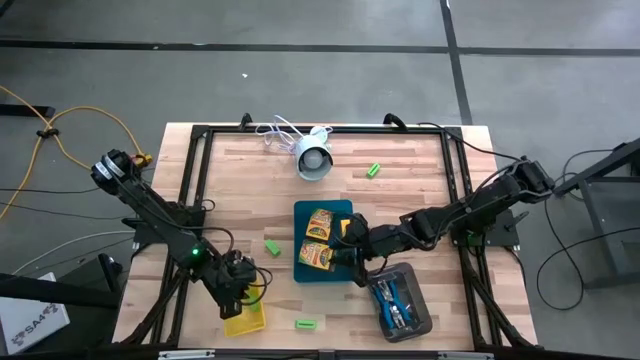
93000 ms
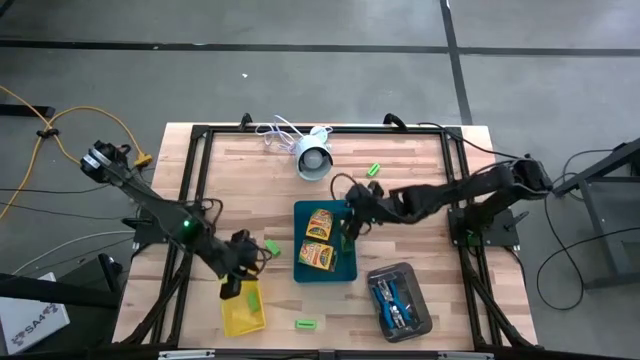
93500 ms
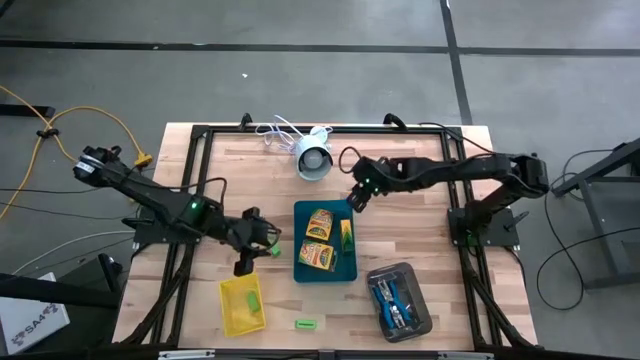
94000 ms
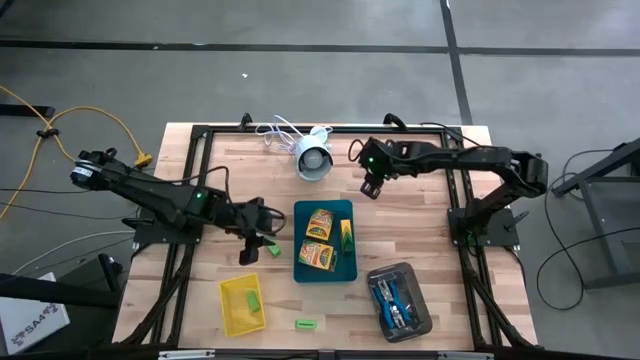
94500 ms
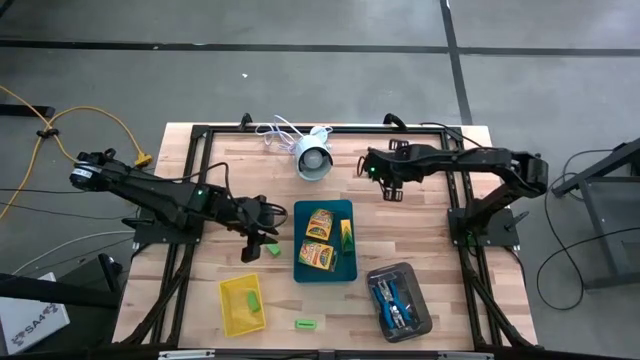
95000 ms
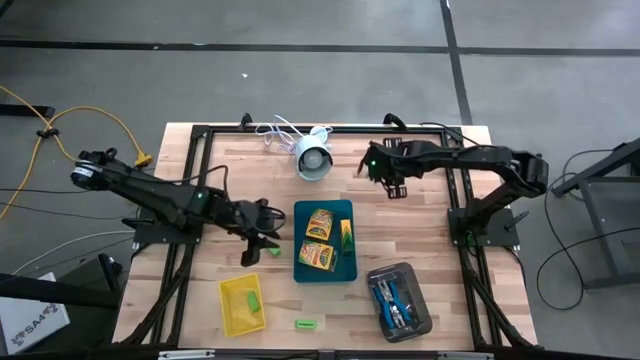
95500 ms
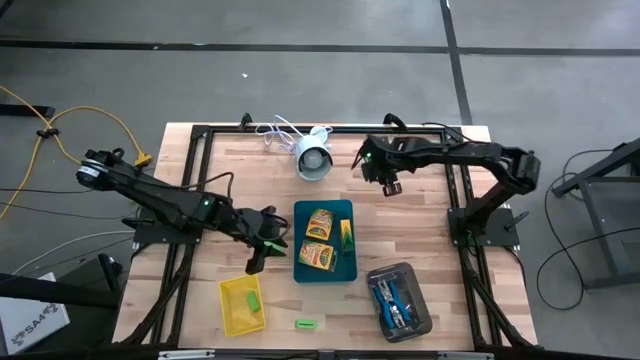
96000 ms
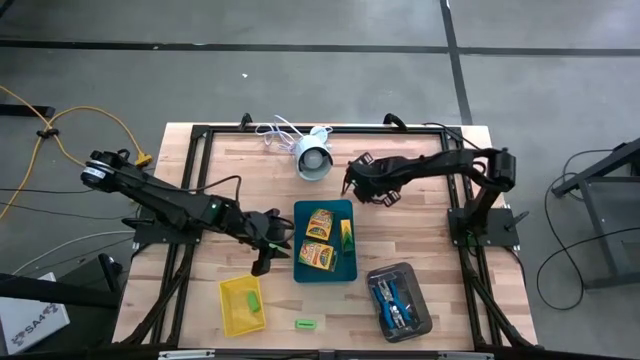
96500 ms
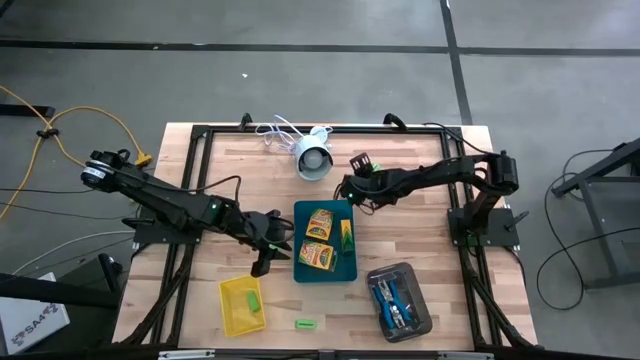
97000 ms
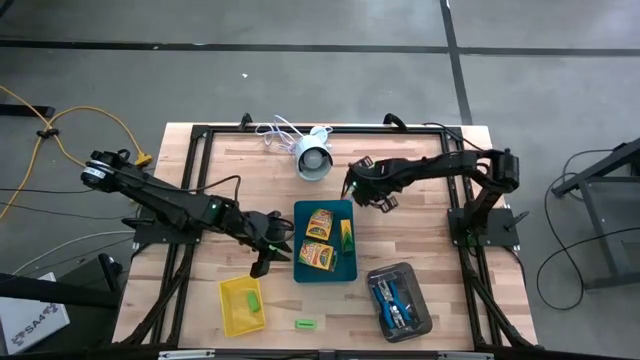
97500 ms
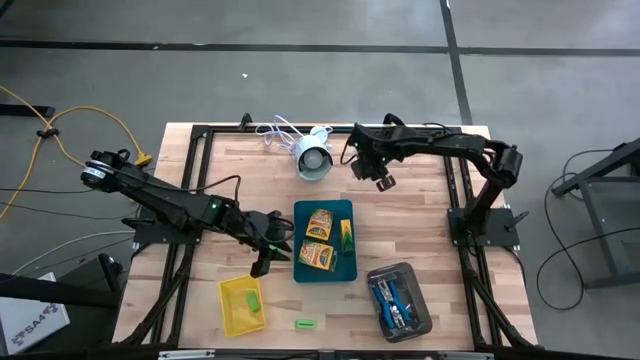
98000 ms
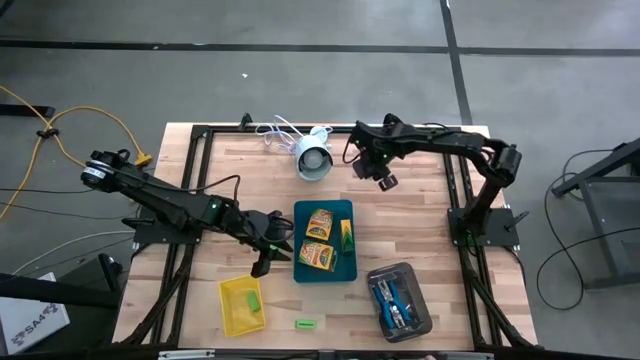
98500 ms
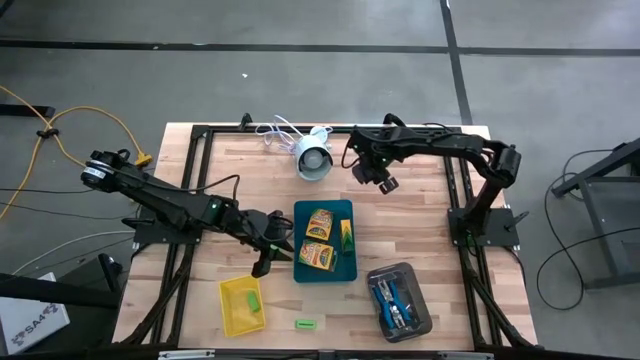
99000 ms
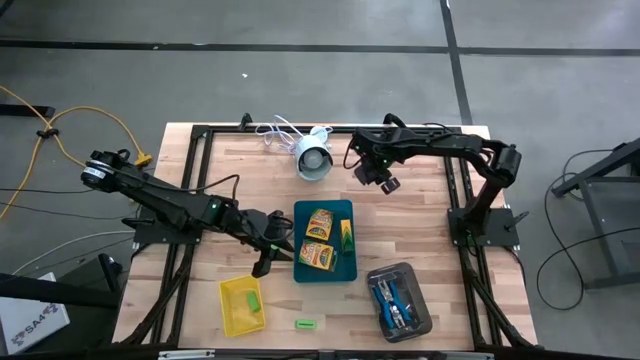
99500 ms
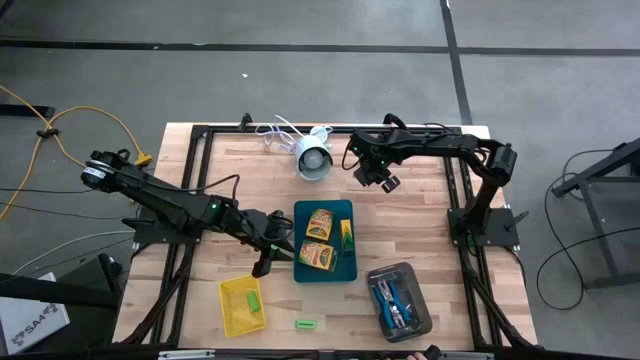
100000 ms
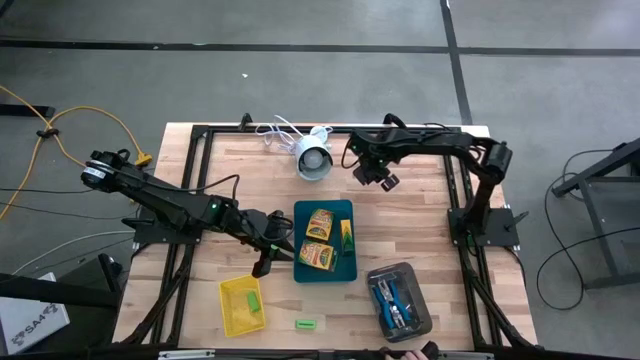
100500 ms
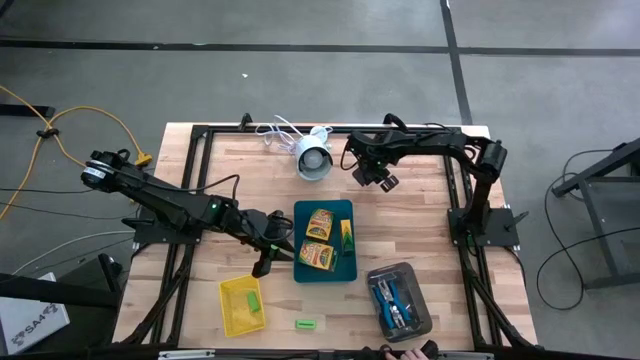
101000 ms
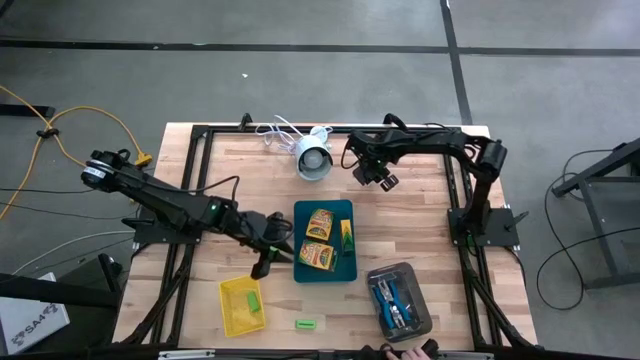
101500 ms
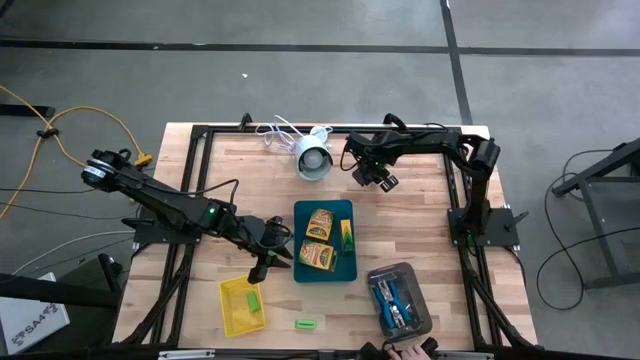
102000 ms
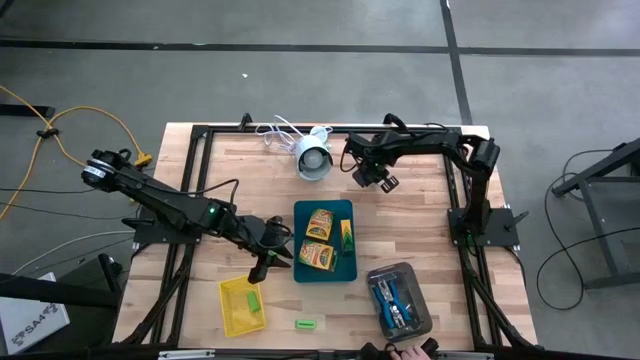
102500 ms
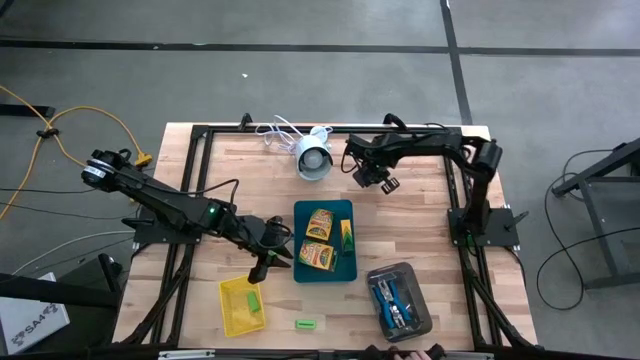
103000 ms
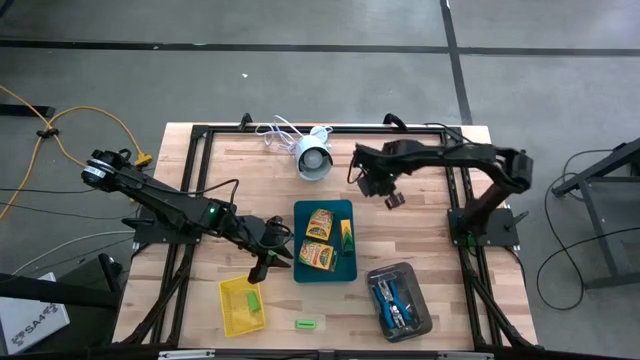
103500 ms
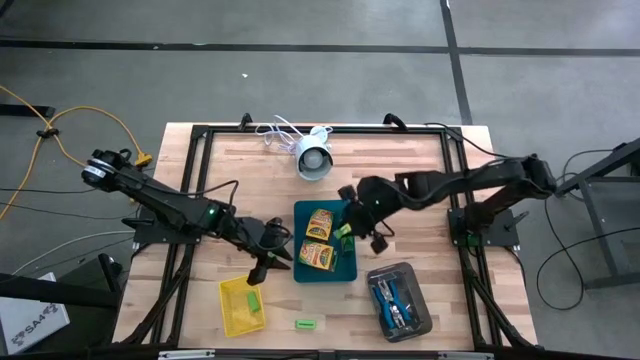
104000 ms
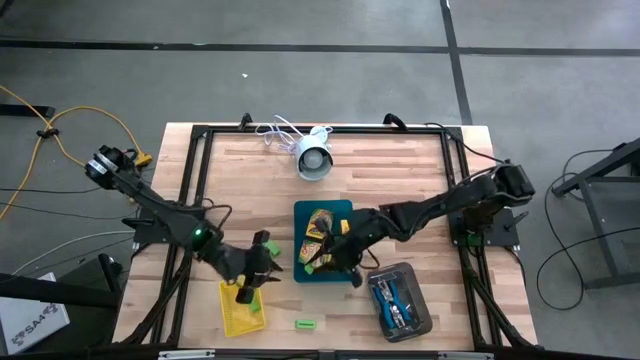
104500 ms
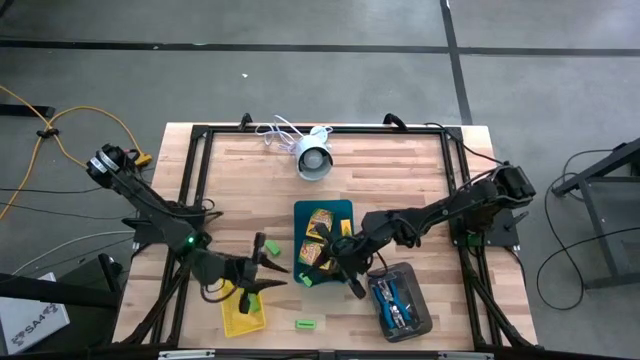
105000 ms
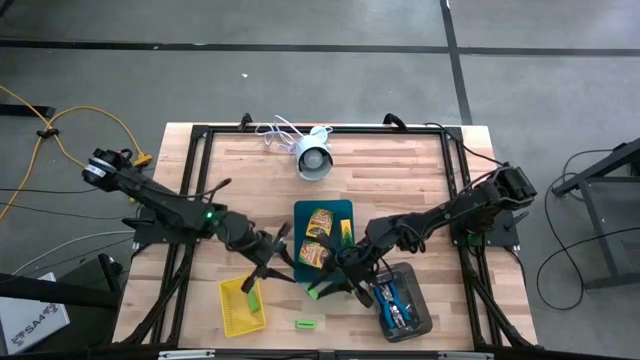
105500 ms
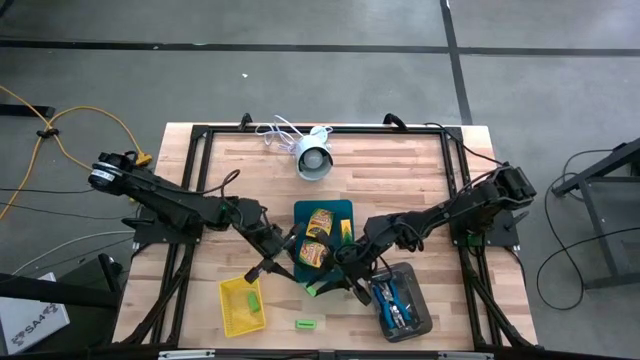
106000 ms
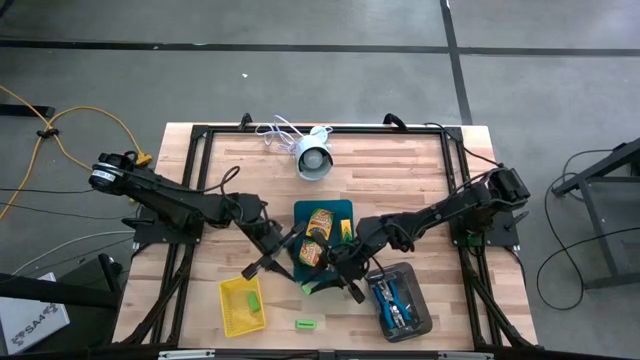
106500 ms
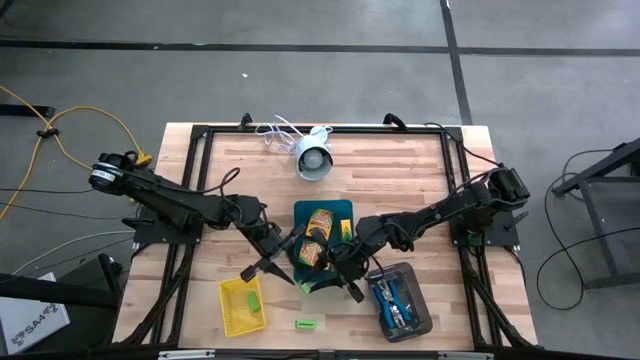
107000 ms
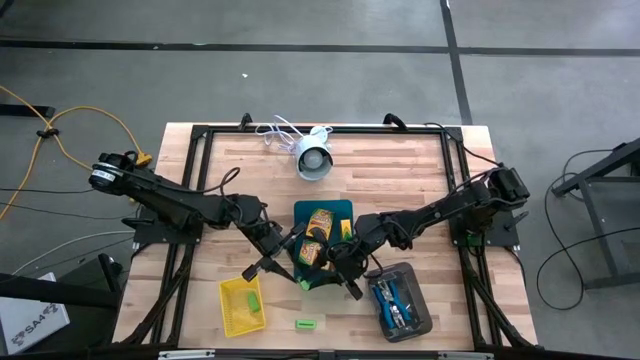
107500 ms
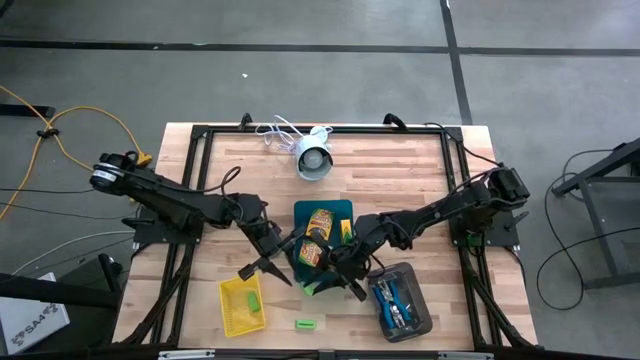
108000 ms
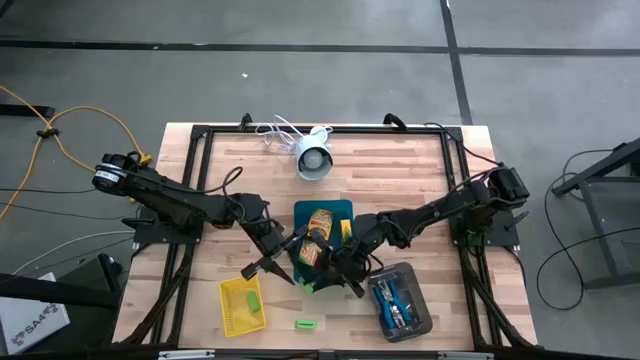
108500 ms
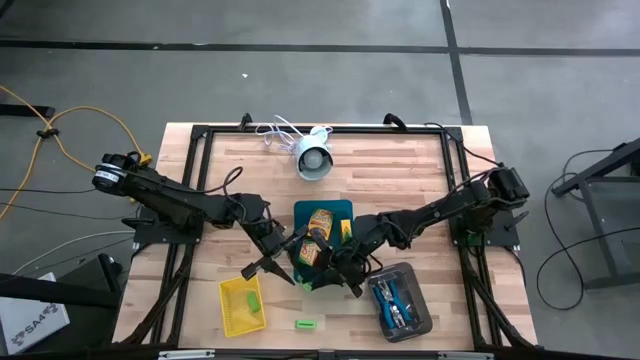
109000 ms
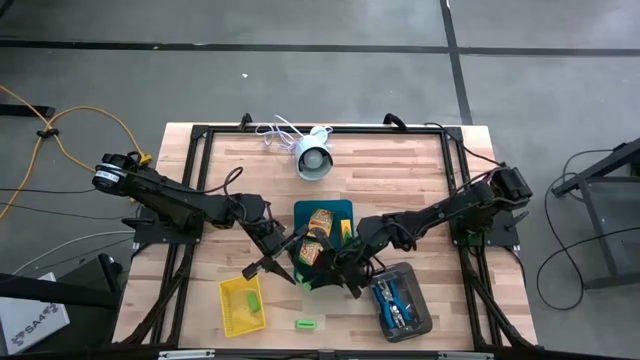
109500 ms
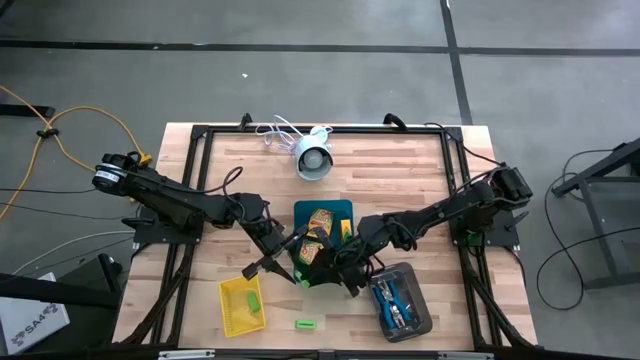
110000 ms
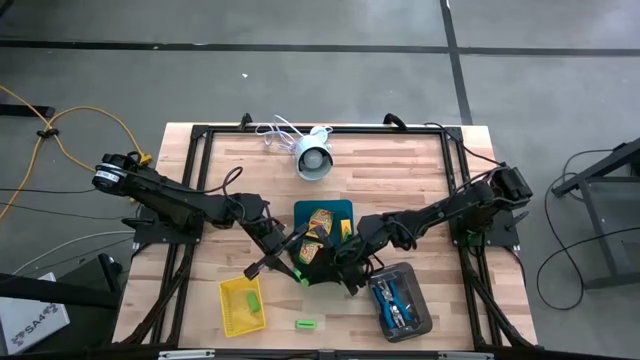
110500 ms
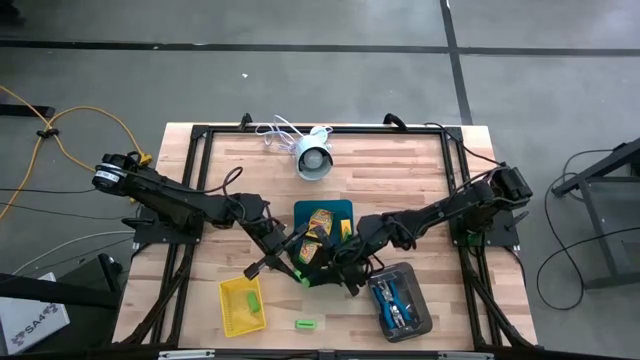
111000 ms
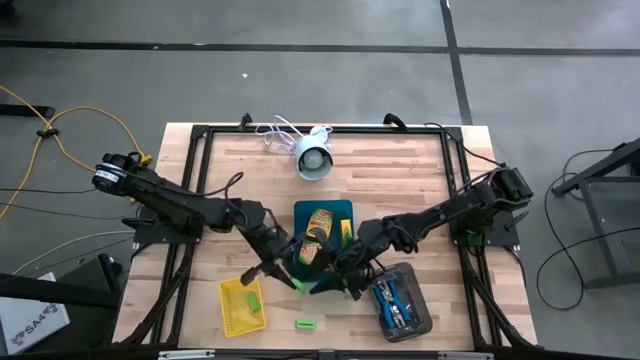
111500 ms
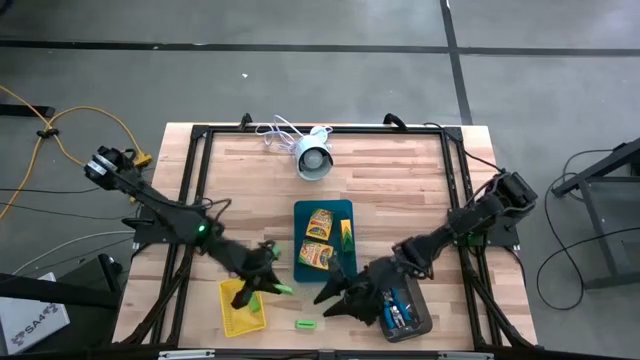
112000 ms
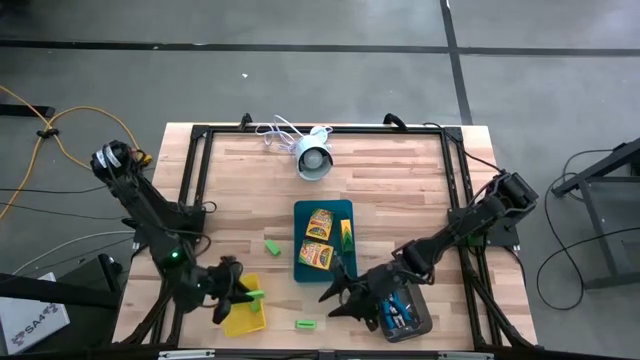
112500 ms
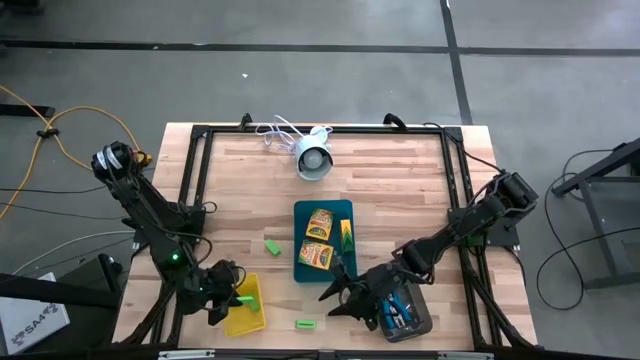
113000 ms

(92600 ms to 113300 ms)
Task: Pick & Place School Supplies
Put the green eraser into the yellow bin

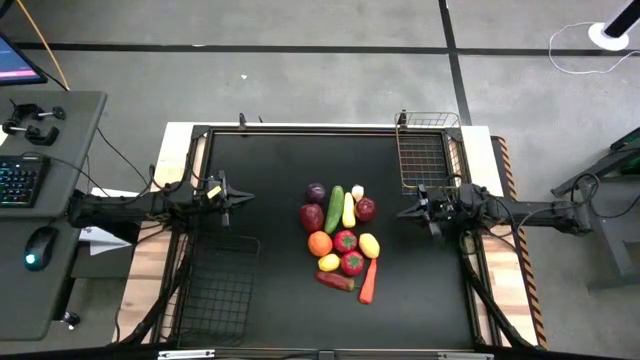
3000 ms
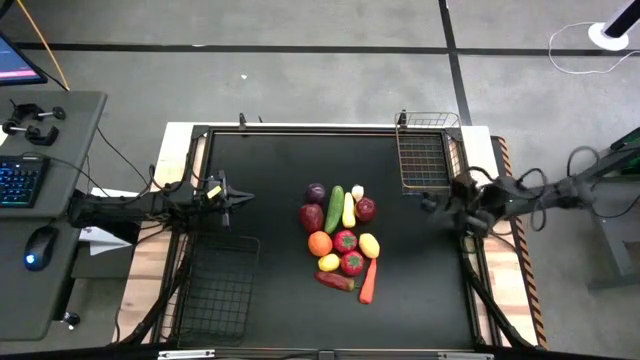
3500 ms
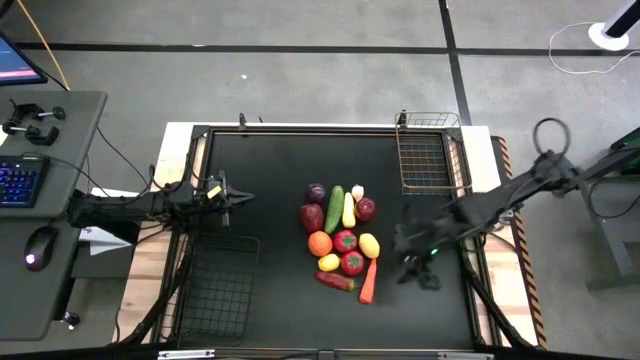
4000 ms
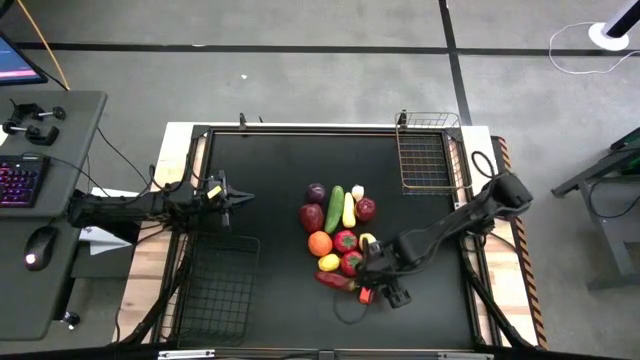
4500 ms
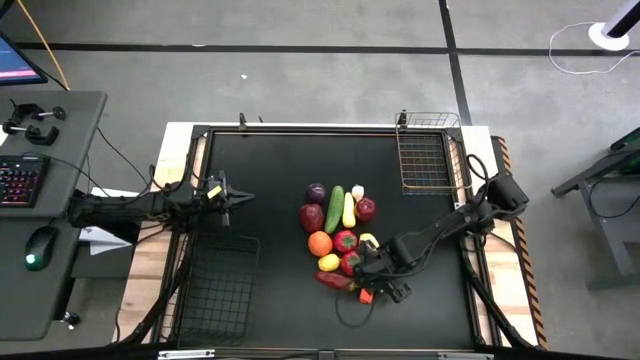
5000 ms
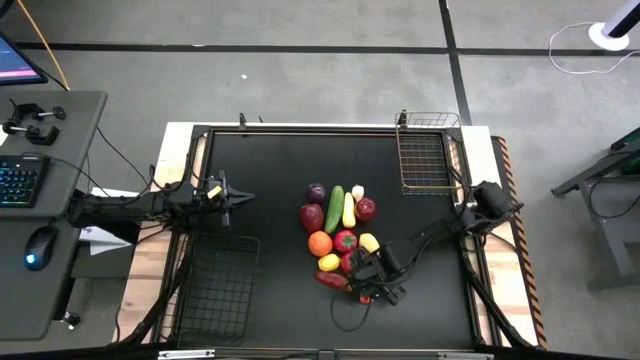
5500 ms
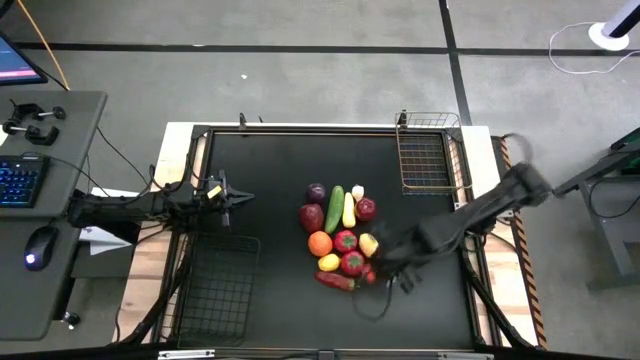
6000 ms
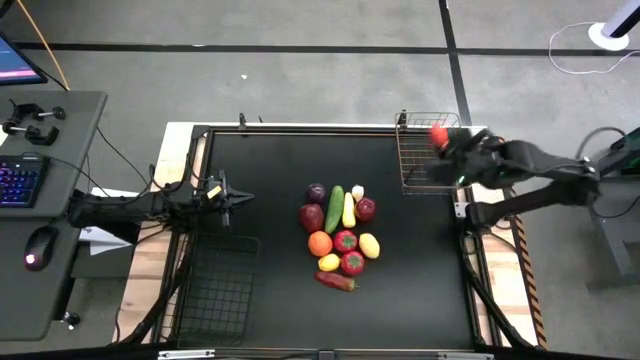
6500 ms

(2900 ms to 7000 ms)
Task: Sort produce into baskets
Put the carrot into the right wire basket
